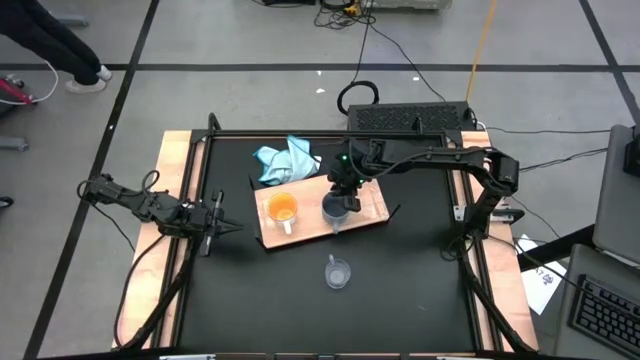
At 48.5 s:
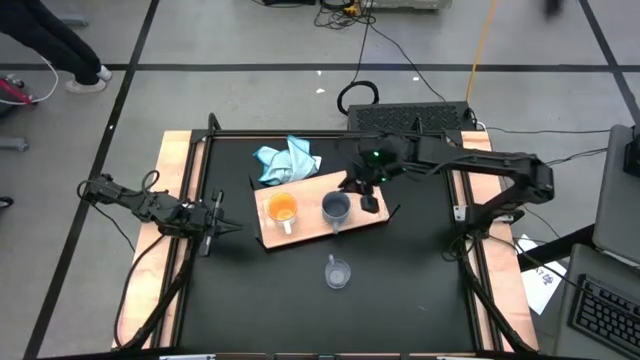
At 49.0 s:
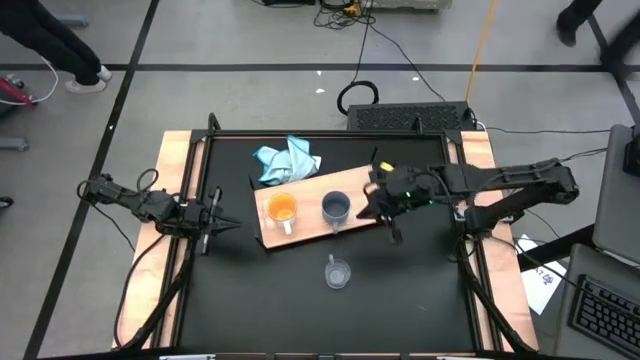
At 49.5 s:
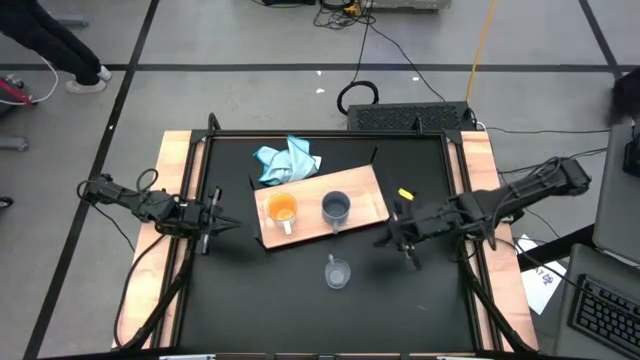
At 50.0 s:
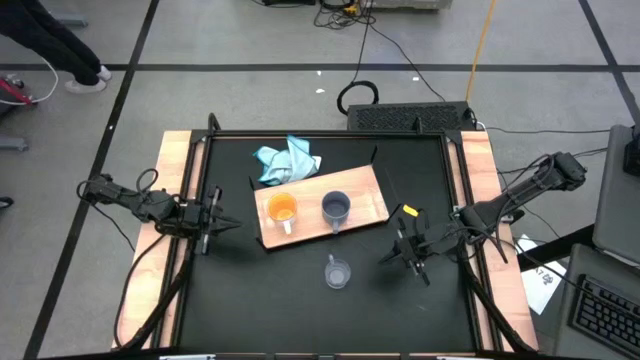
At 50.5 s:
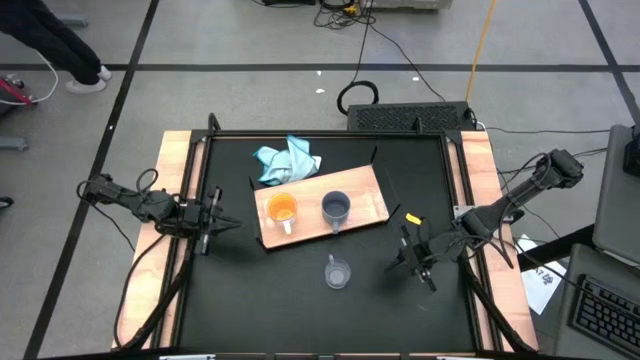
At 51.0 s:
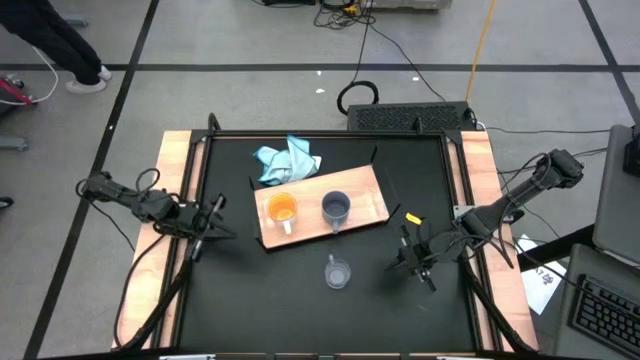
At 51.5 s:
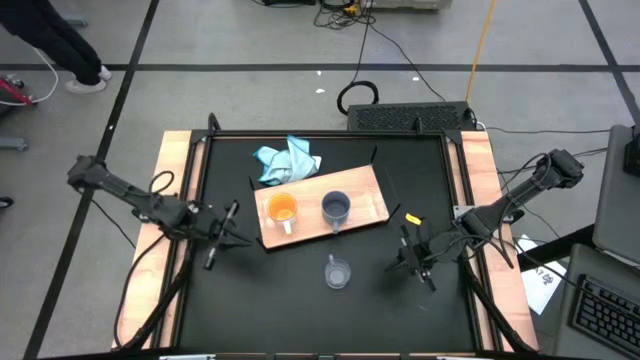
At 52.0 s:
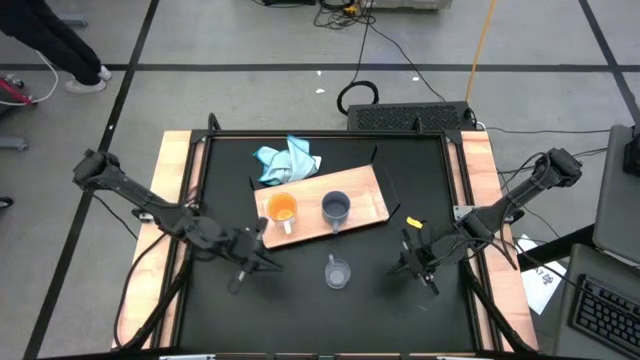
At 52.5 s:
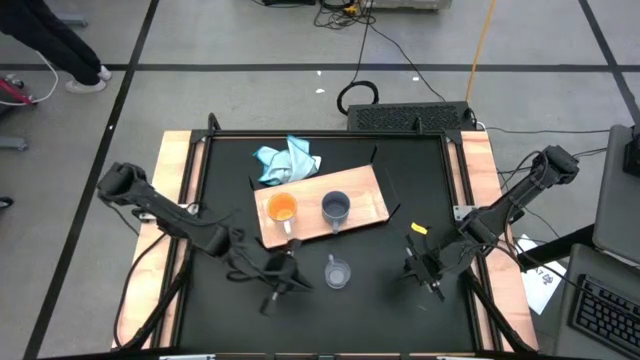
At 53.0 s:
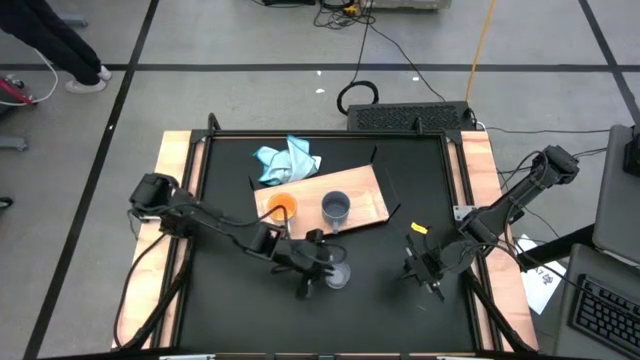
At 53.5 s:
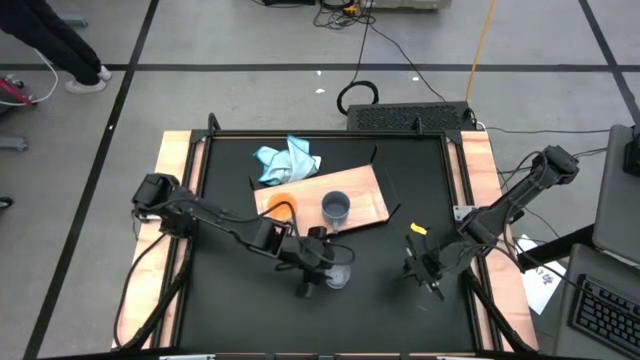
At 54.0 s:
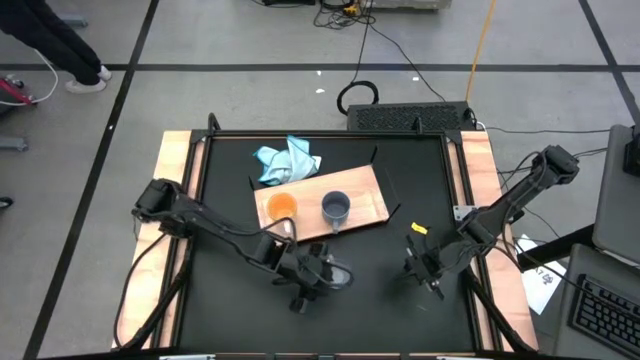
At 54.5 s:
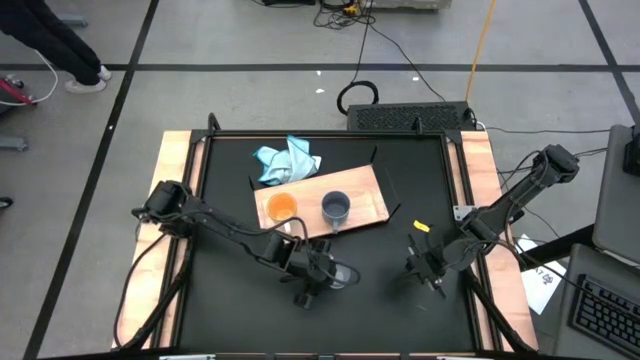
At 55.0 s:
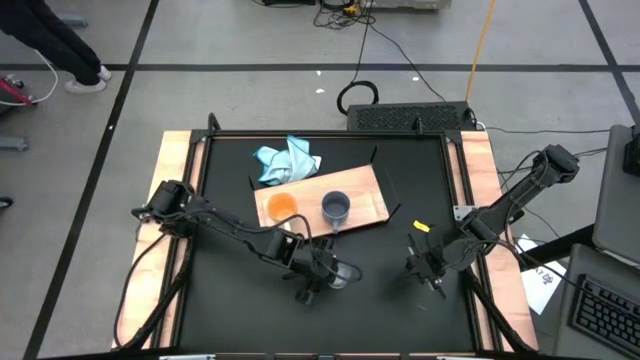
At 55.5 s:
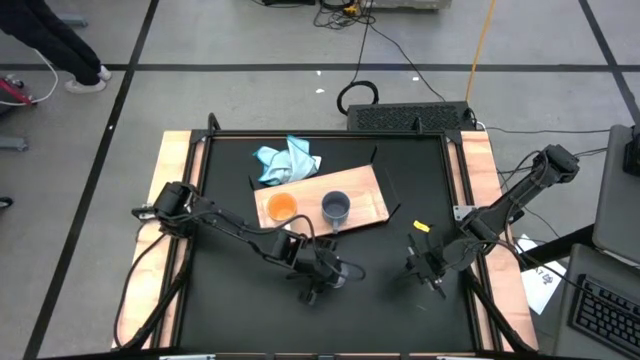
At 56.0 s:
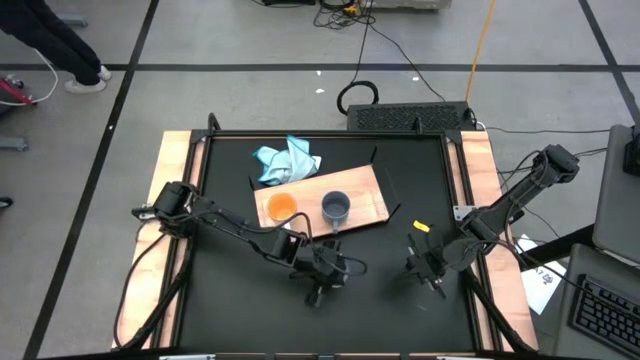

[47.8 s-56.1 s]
Task: Stack small to large cups/mugs on shelf
Put the transparent mug on the shelf

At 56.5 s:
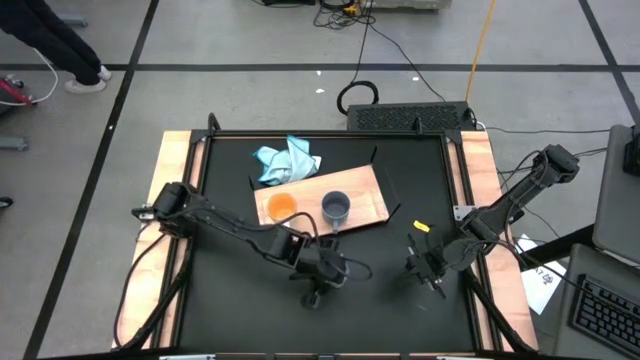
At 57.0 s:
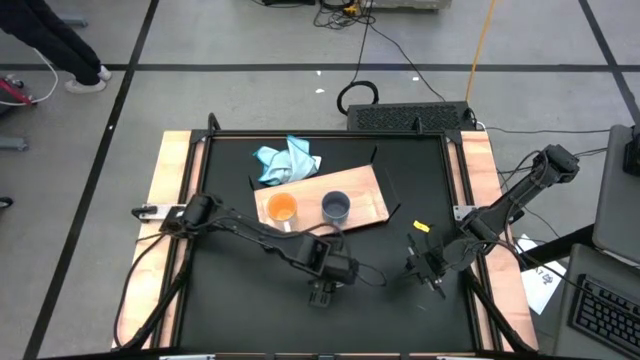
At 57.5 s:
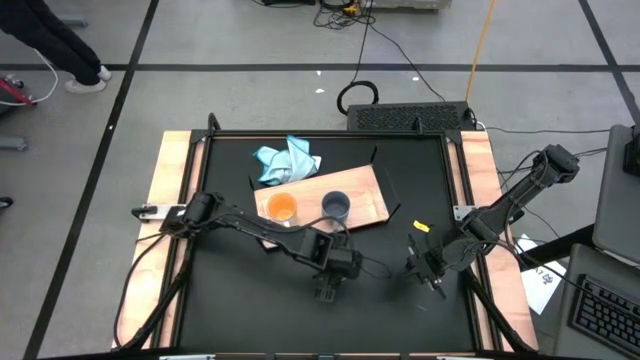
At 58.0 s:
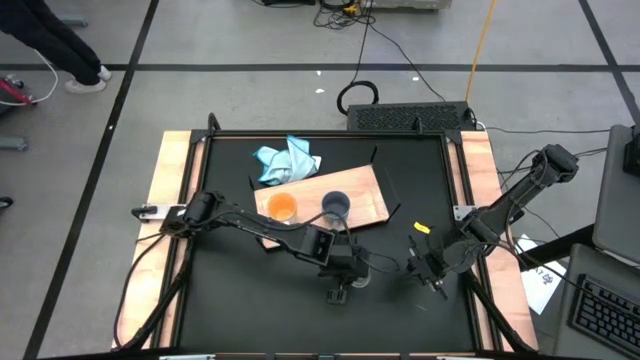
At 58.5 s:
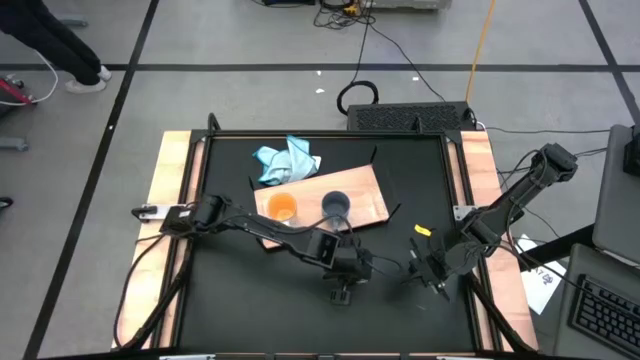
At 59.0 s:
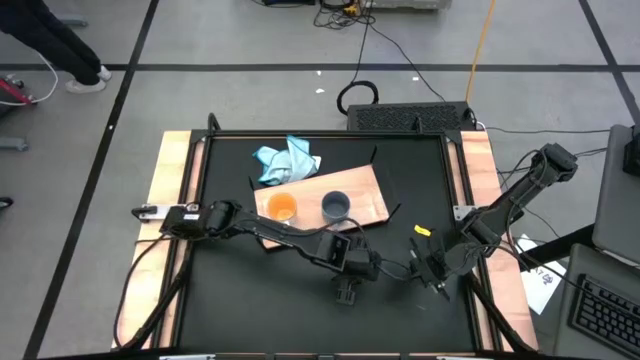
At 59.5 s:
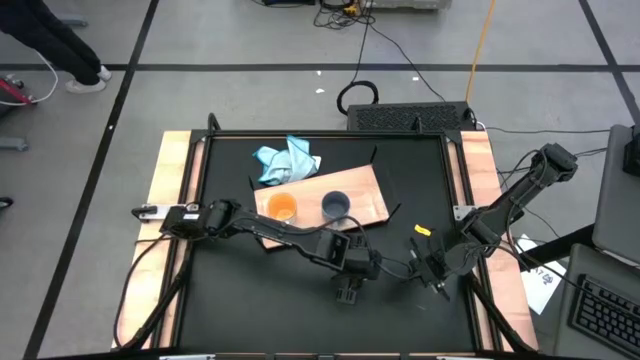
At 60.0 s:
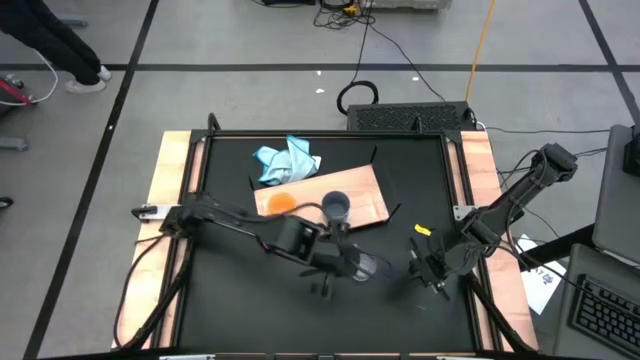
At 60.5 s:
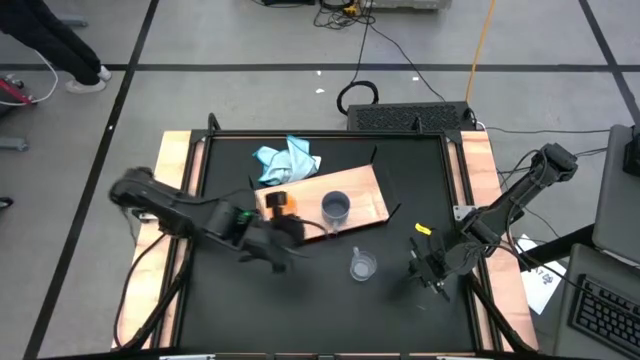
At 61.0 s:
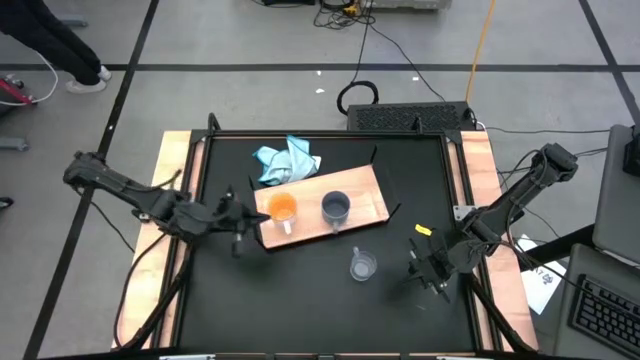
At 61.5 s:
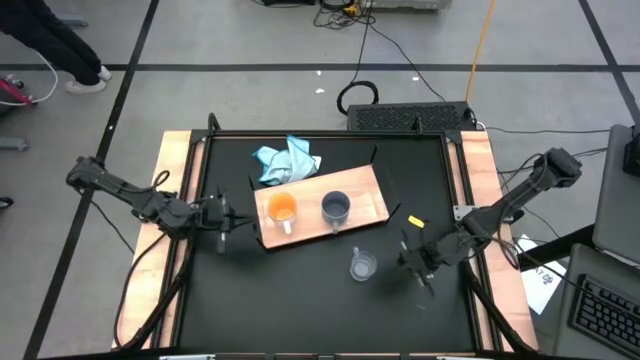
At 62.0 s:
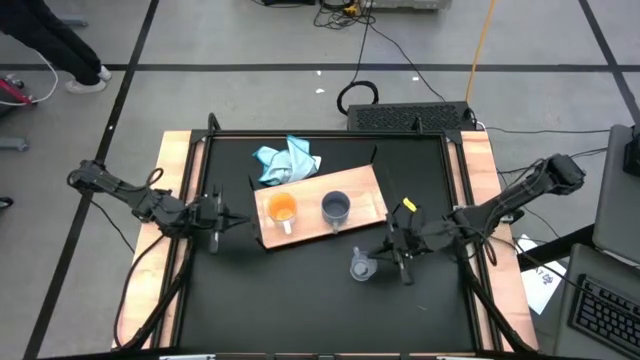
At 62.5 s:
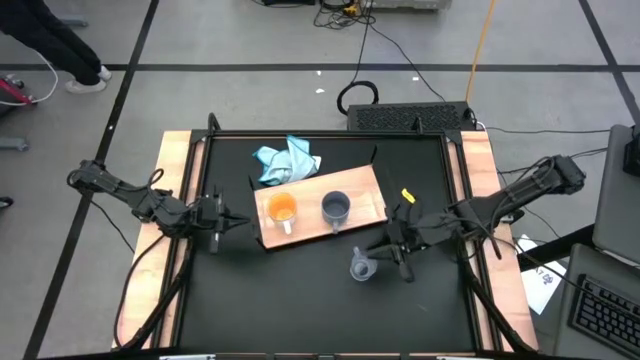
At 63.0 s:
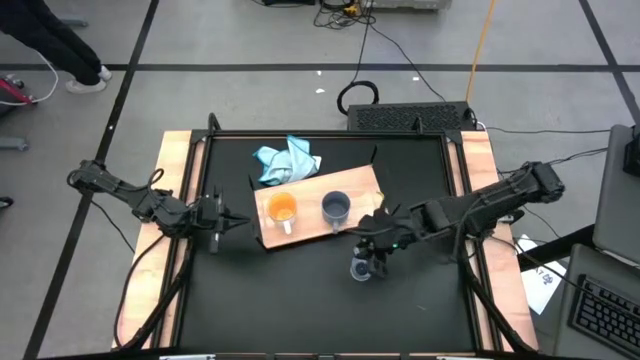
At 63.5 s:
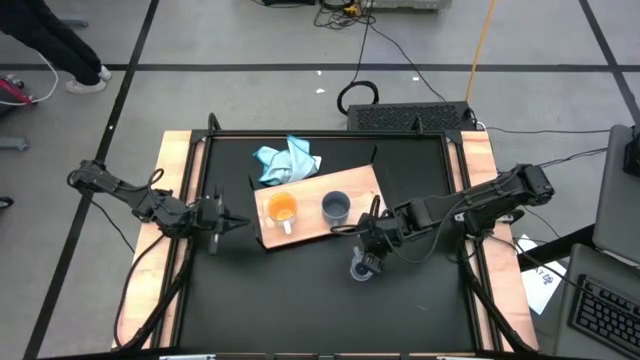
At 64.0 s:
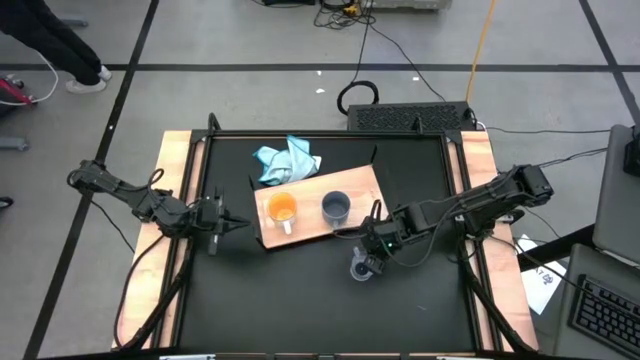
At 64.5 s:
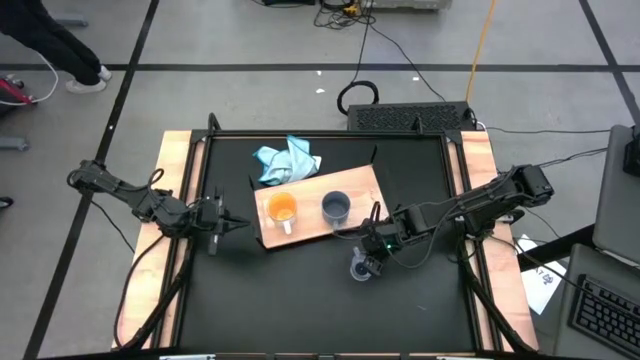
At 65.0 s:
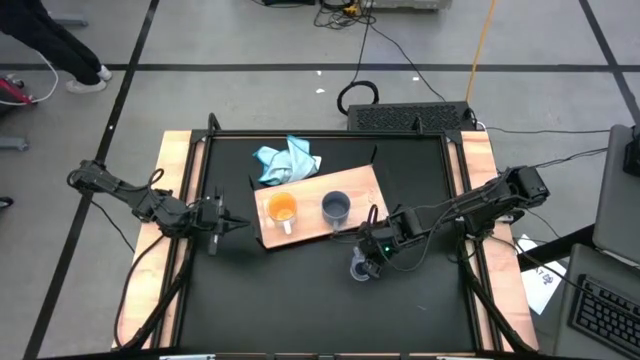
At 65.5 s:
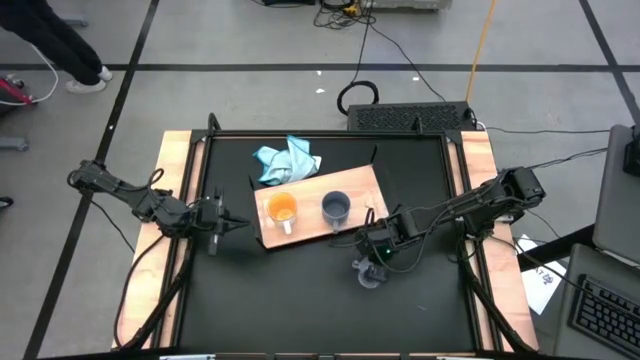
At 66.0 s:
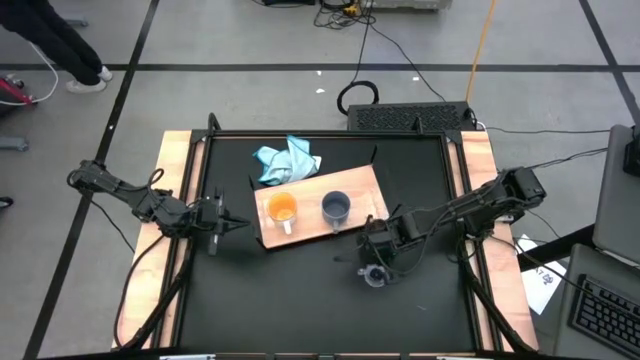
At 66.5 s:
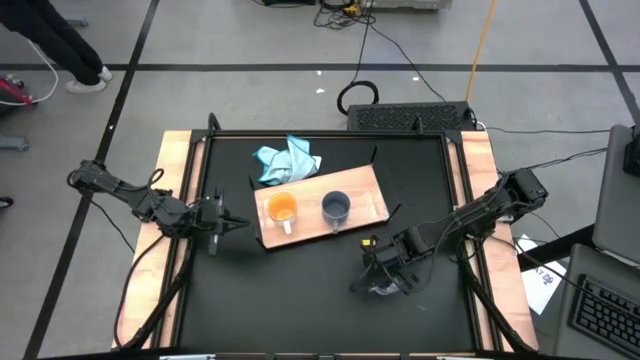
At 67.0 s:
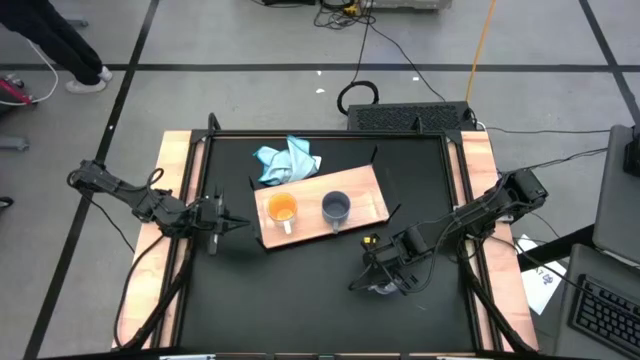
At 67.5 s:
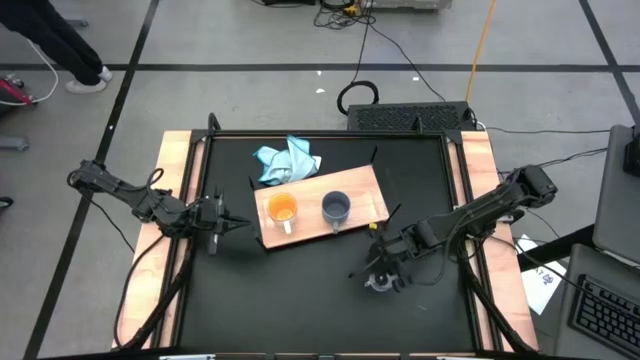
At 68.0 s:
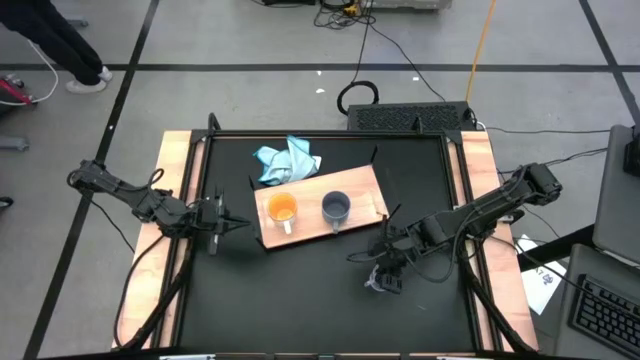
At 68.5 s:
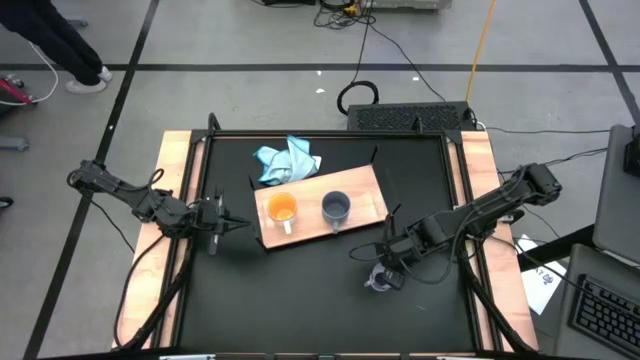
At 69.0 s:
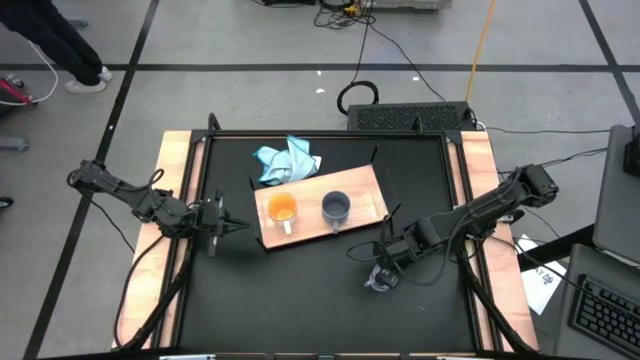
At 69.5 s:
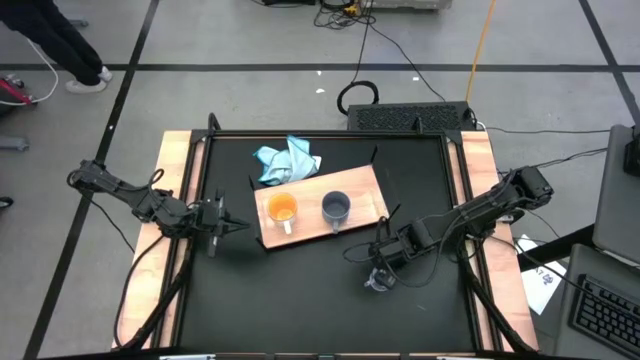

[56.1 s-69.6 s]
Put the transparent mug on the shelf
